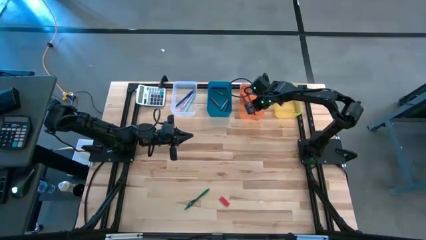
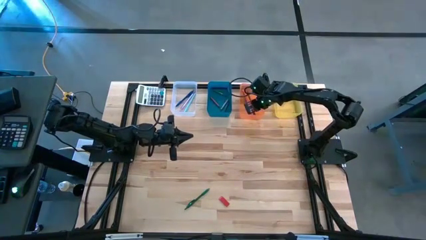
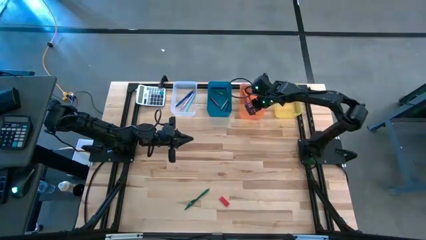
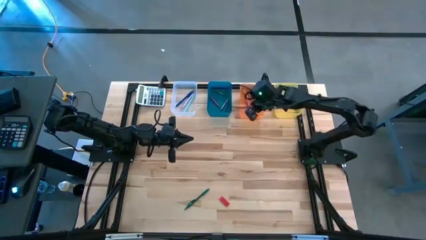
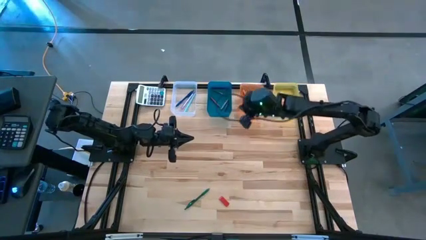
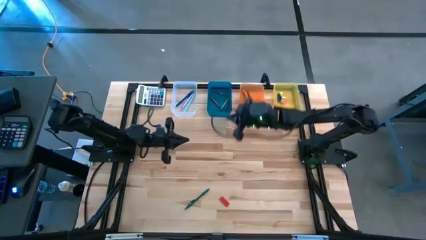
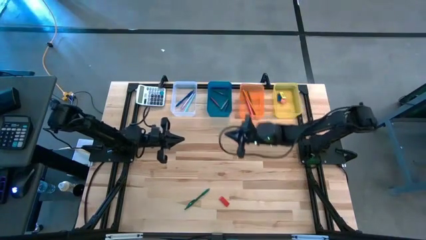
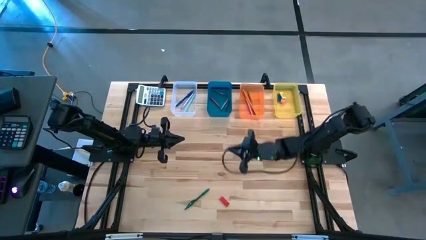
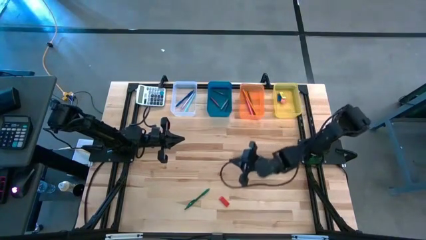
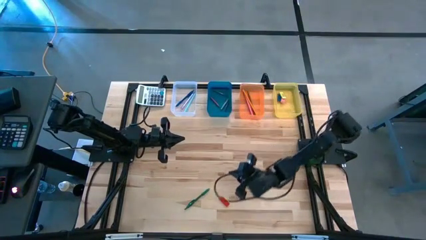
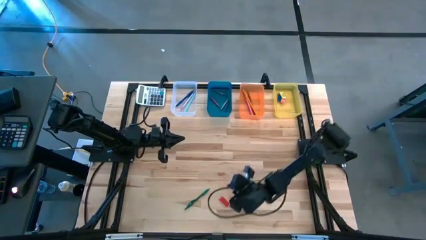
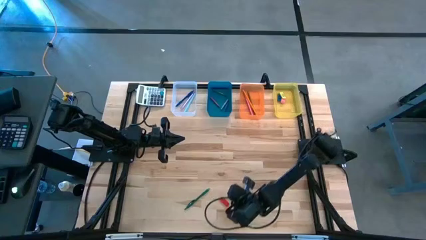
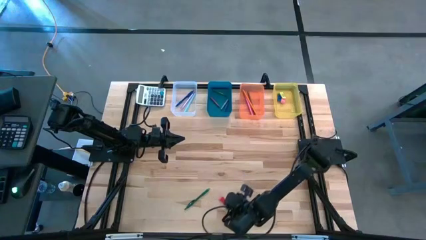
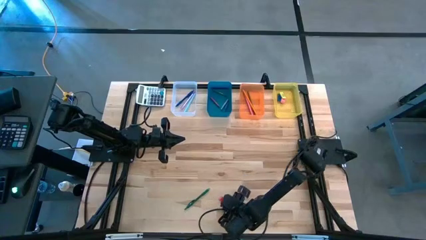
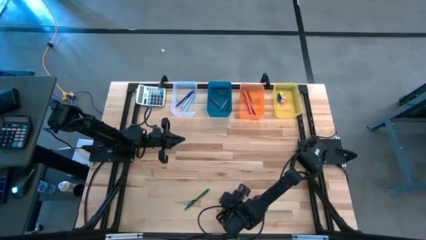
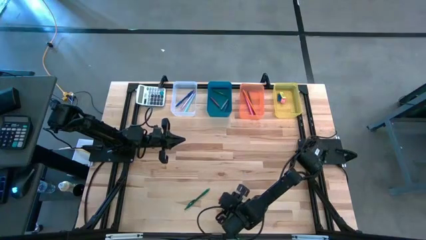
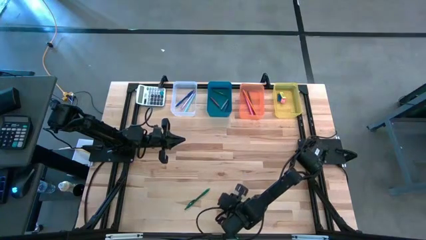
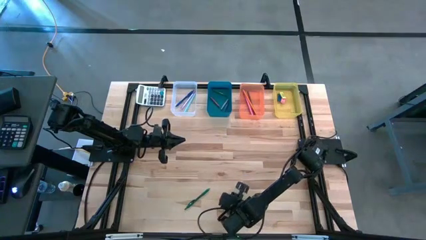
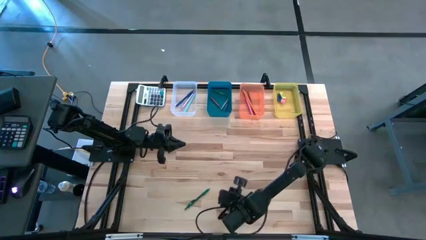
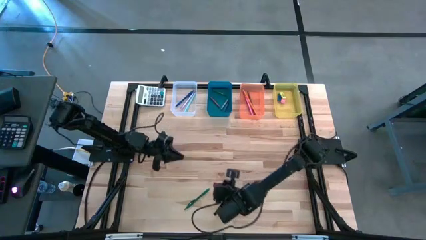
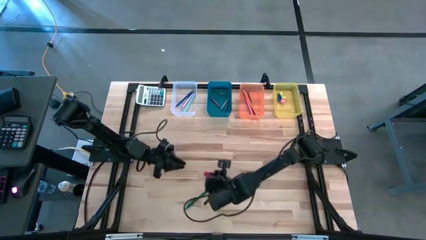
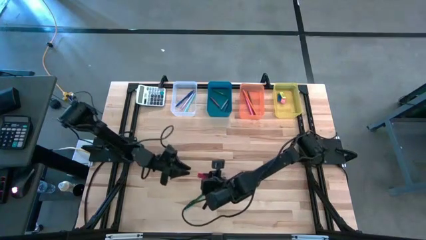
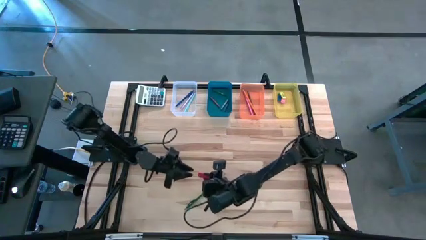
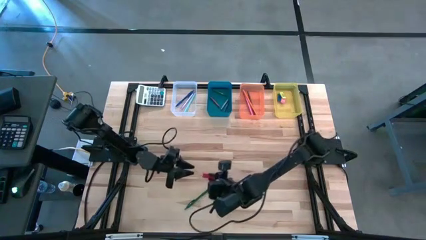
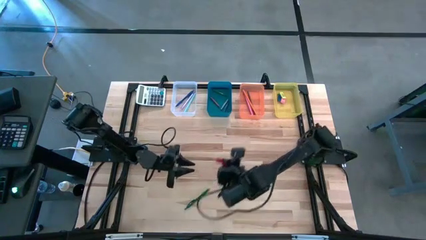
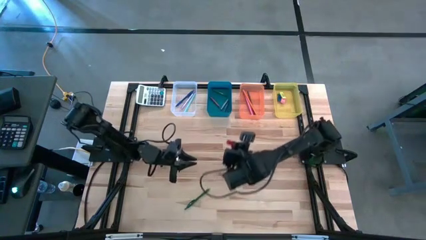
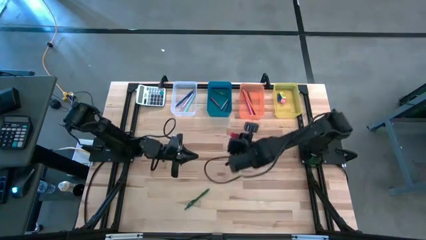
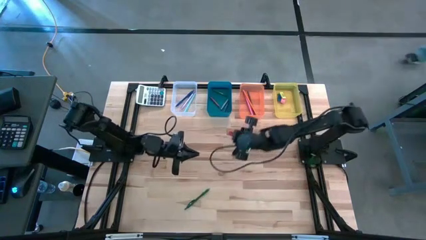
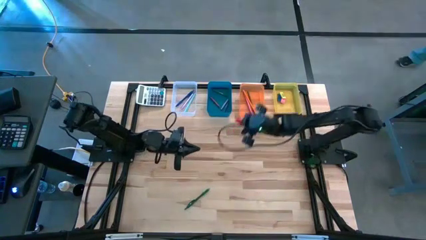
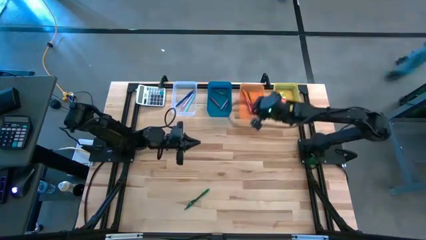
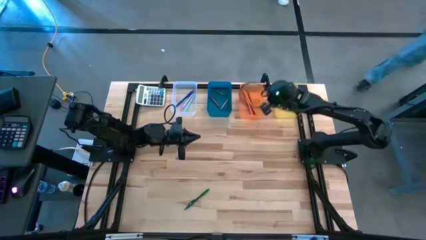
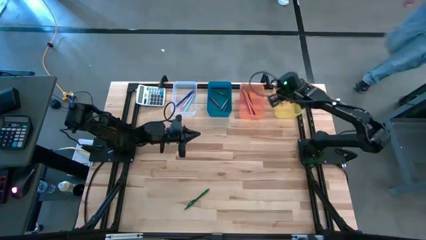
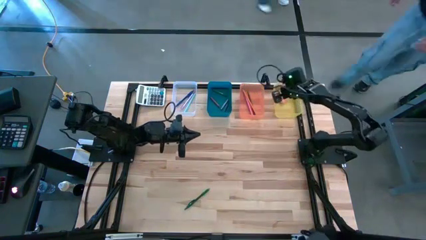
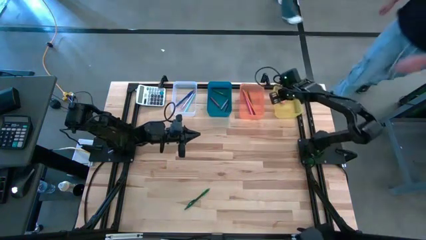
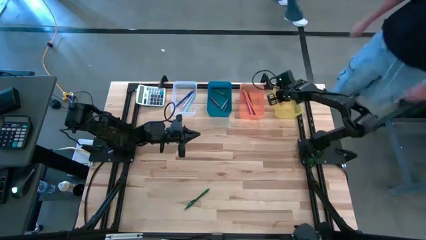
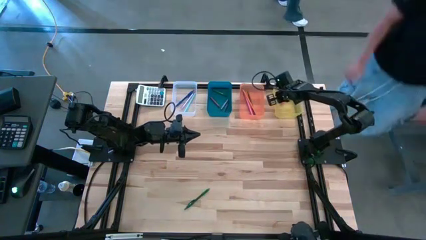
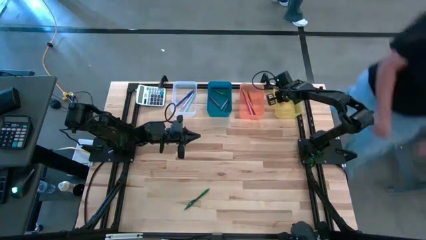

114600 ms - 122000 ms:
Task: Sort crayons/erasers/pens/pencils in bins
Put the red eraser into the yellow bin

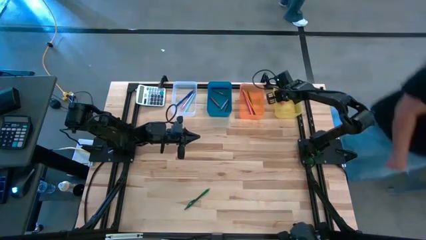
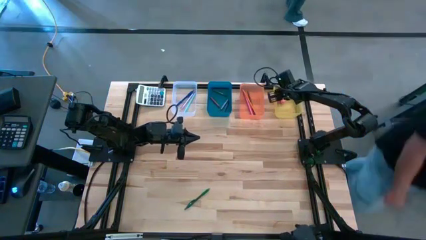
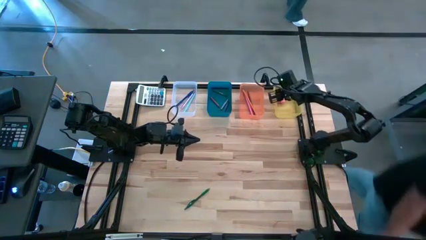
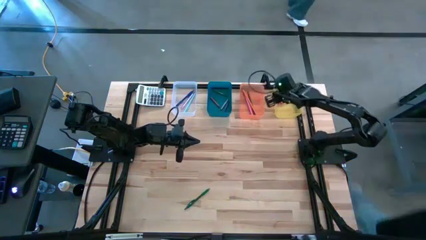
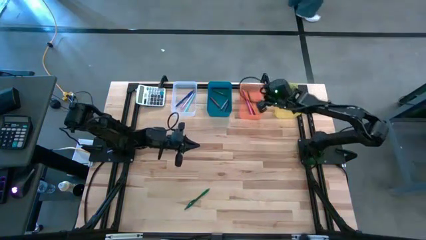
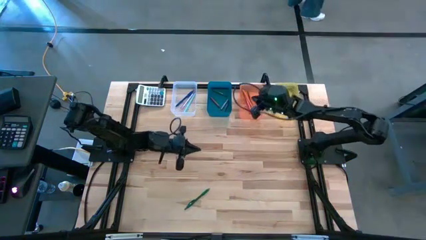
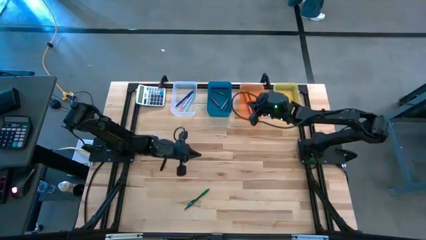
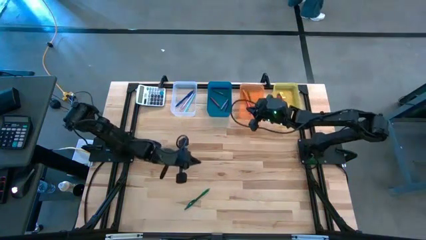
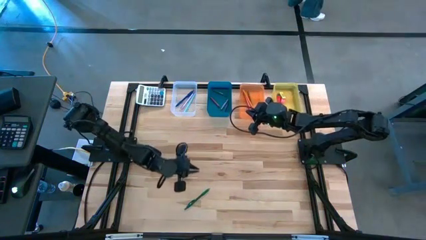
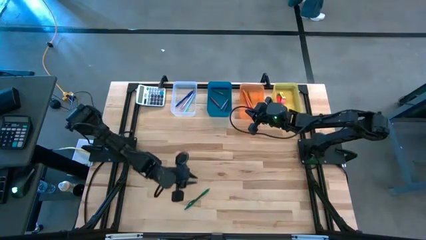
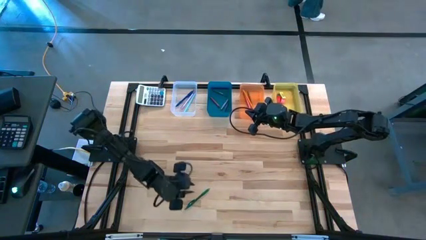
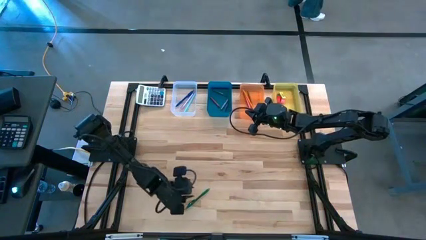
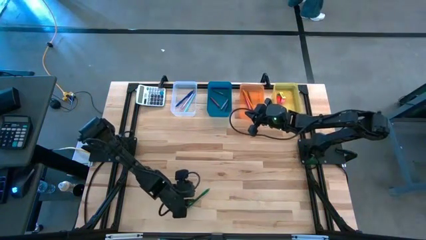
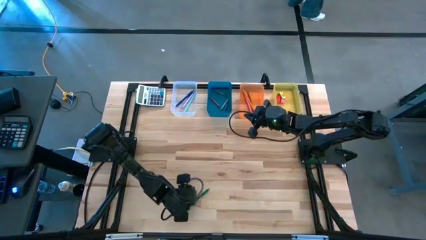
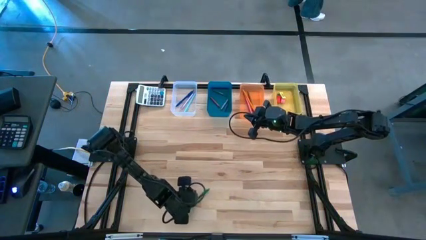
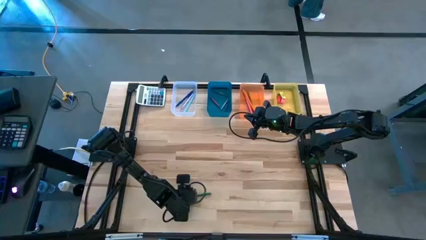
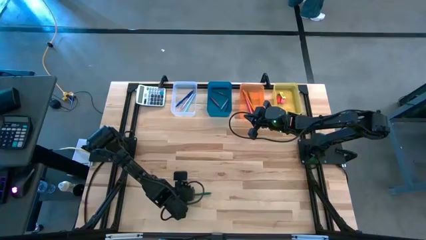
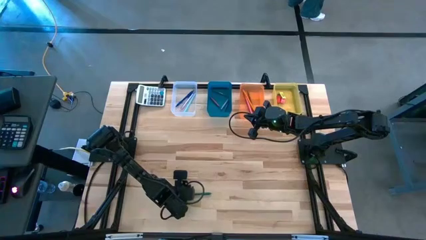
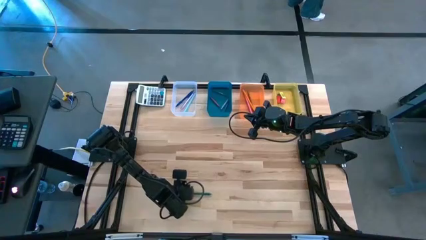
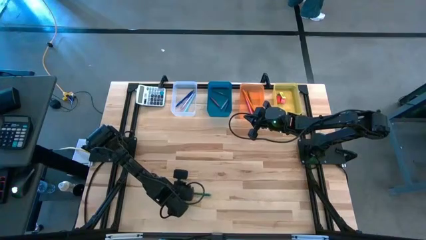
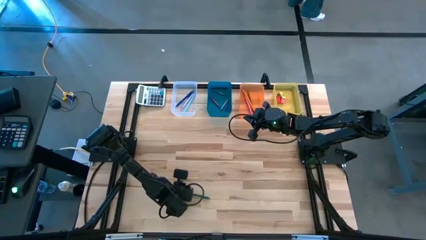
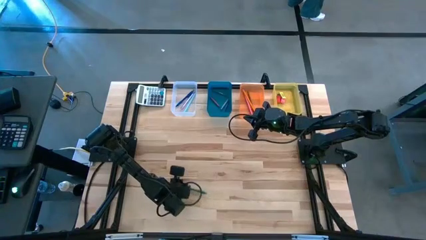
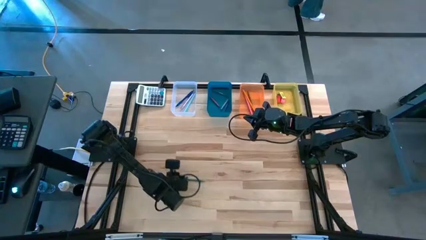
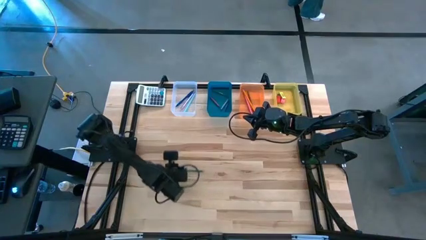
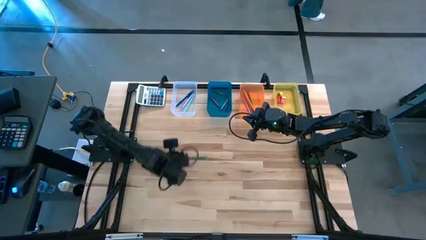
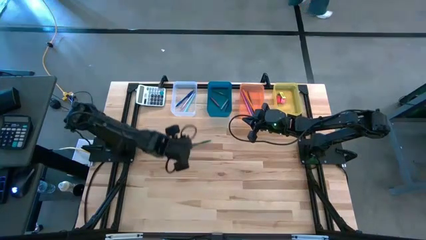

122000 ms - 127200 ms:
Put the green pen into the transparent bin

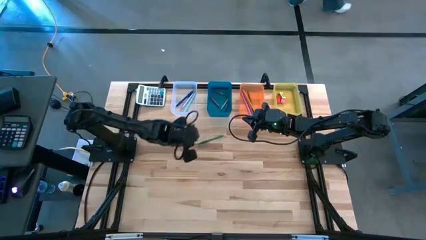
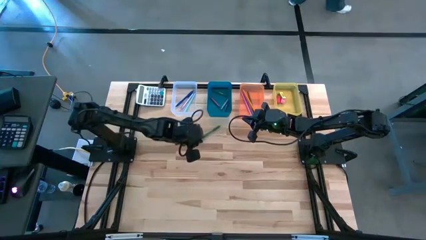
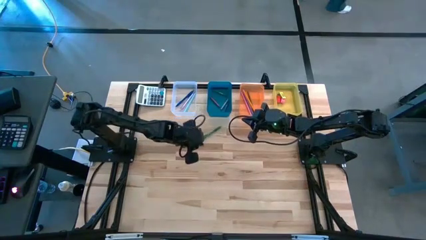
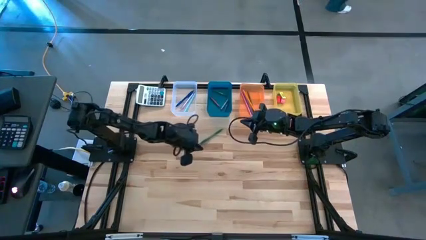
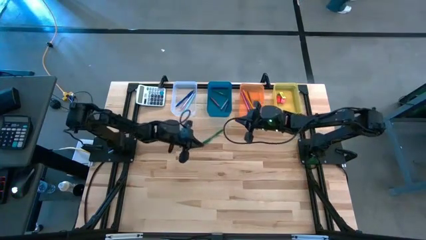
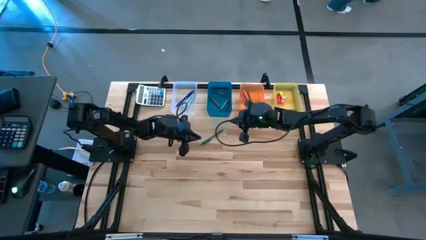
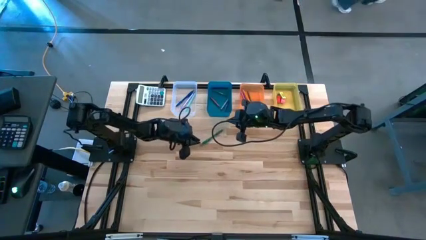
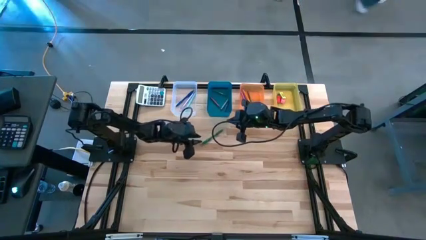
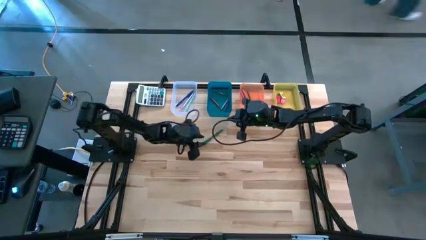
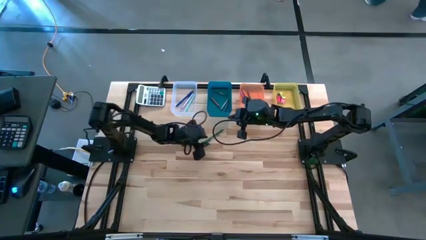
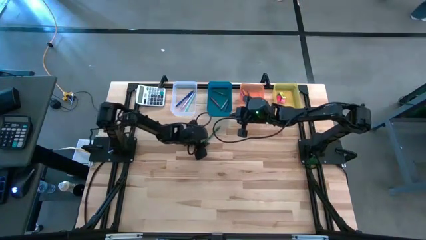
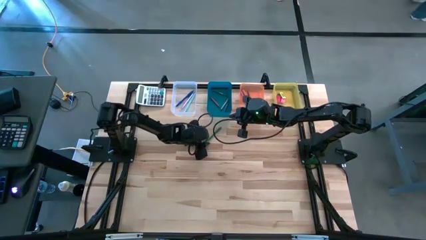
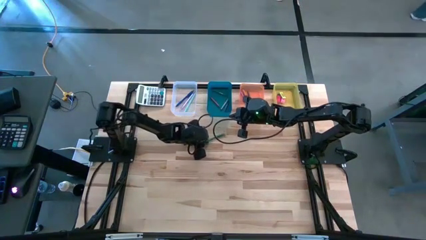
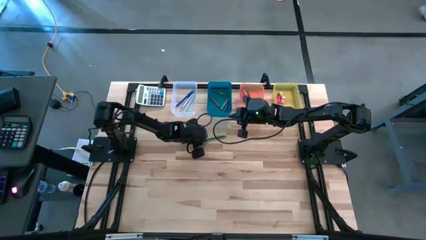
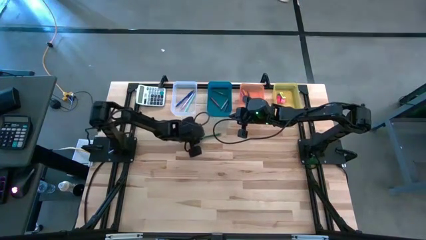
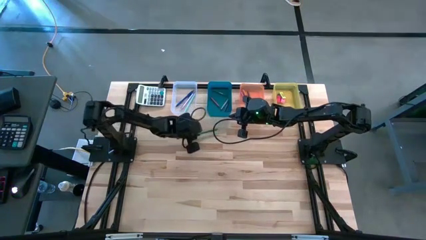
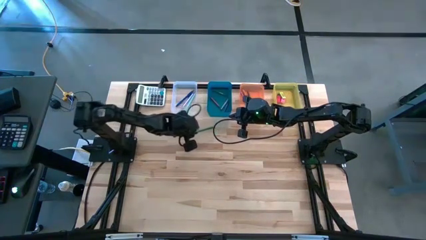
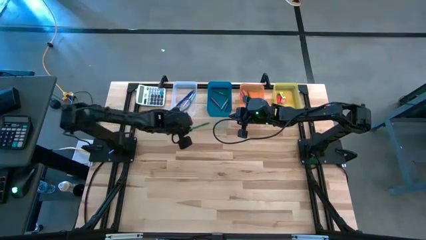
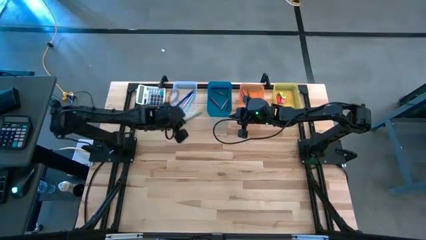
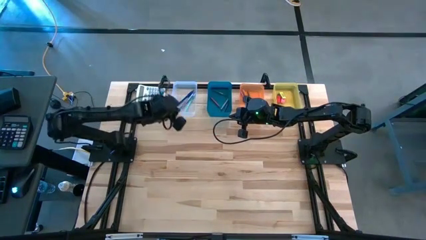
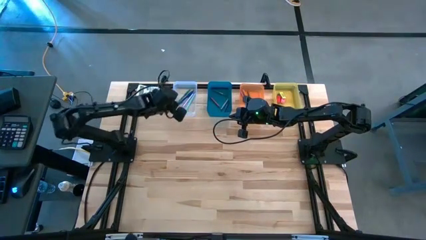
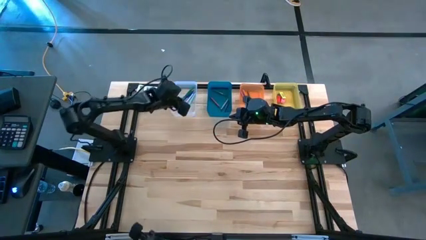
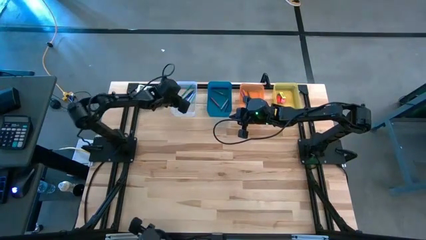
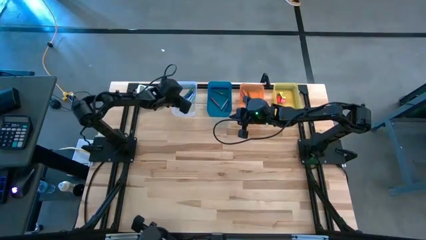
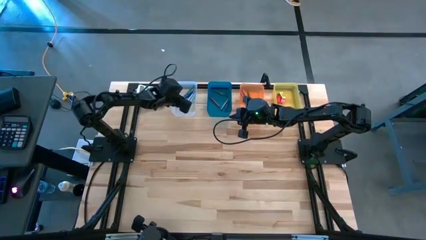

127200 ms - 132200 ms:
Put the green pen into the transparent bin
